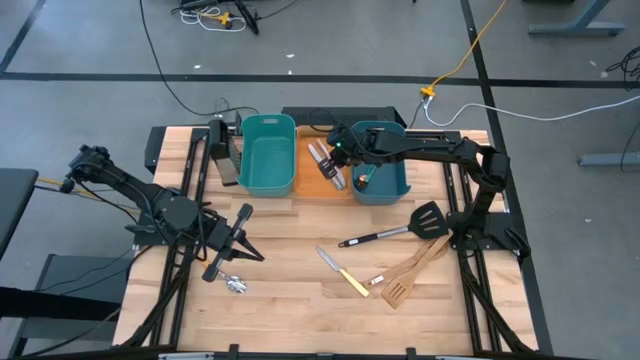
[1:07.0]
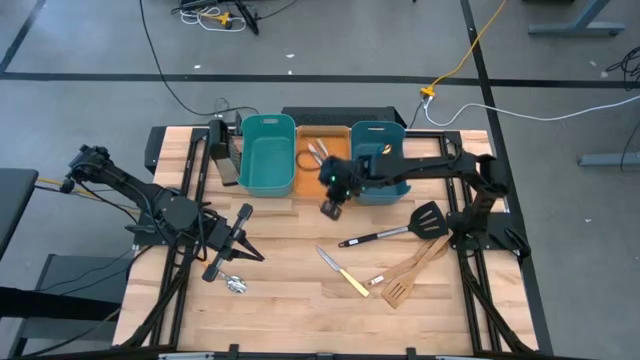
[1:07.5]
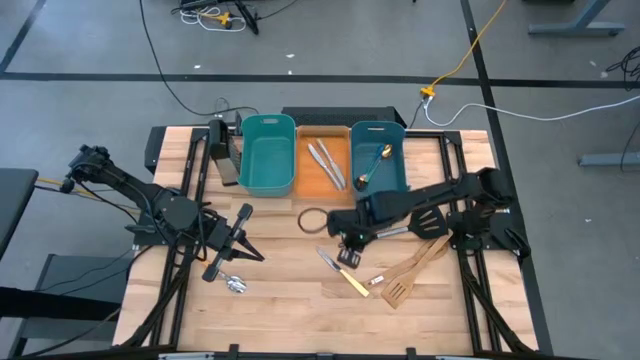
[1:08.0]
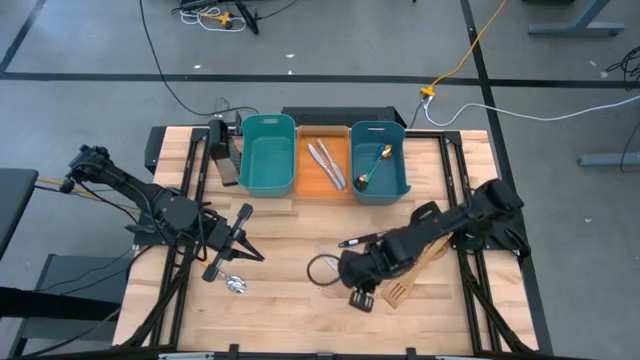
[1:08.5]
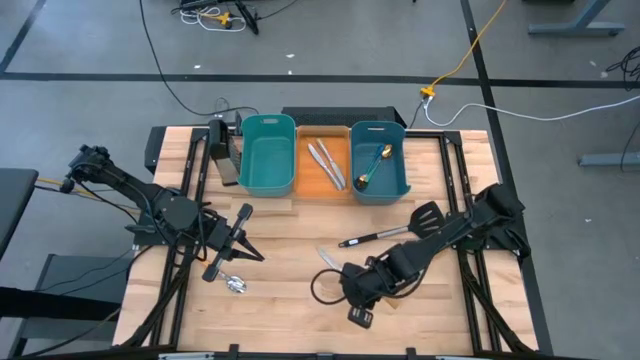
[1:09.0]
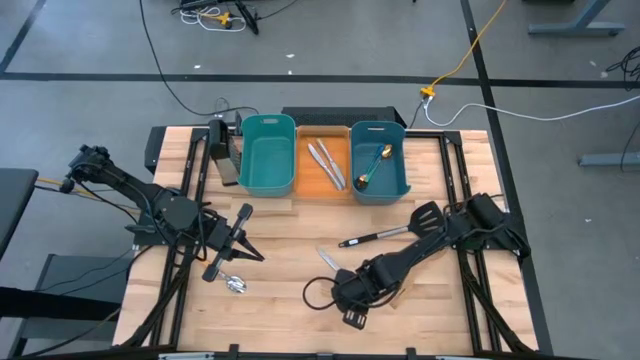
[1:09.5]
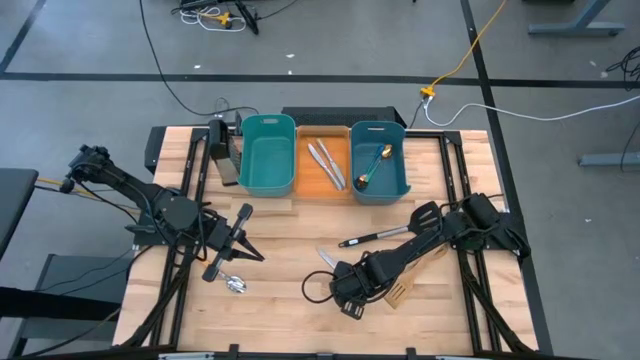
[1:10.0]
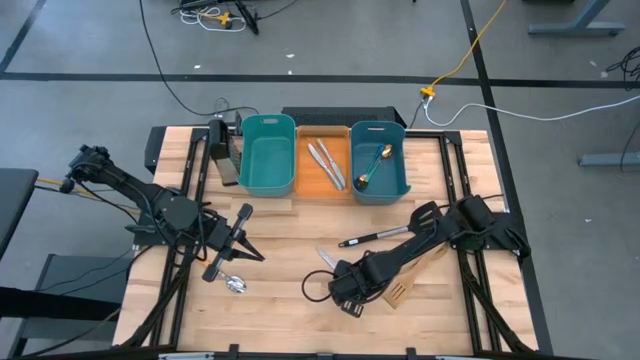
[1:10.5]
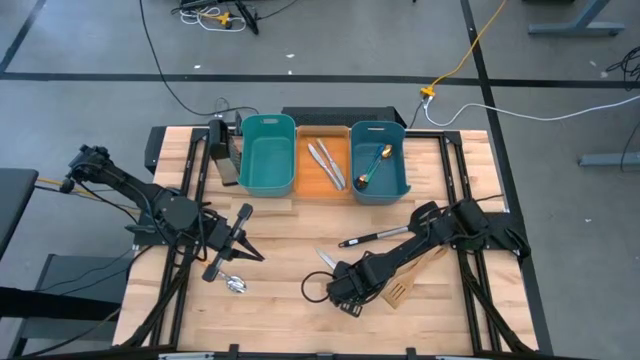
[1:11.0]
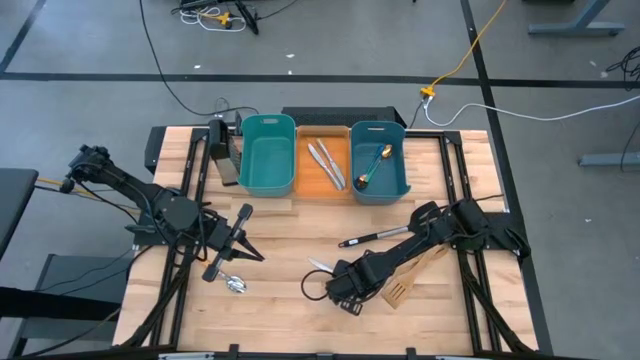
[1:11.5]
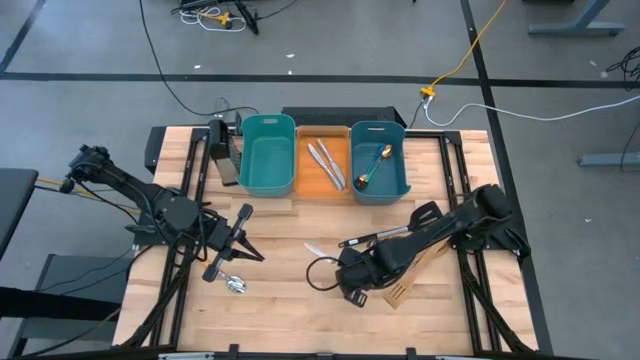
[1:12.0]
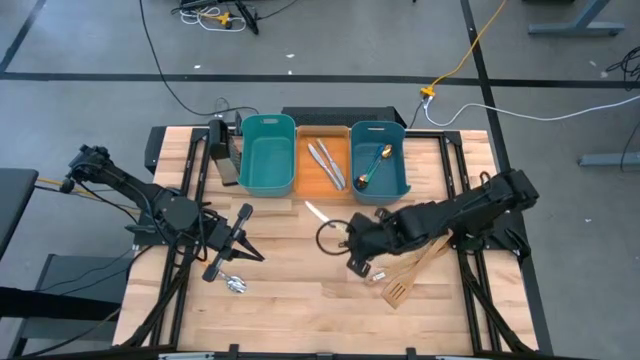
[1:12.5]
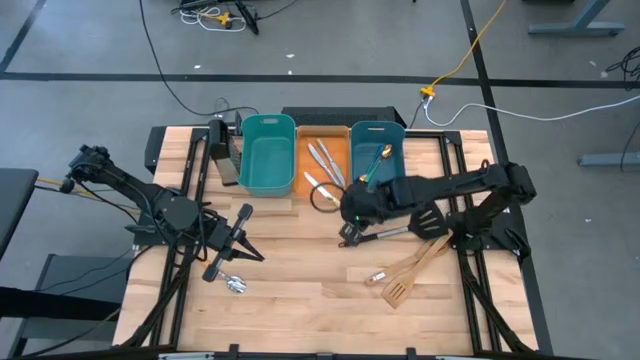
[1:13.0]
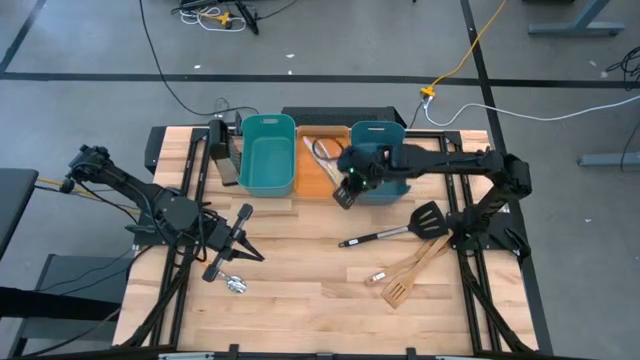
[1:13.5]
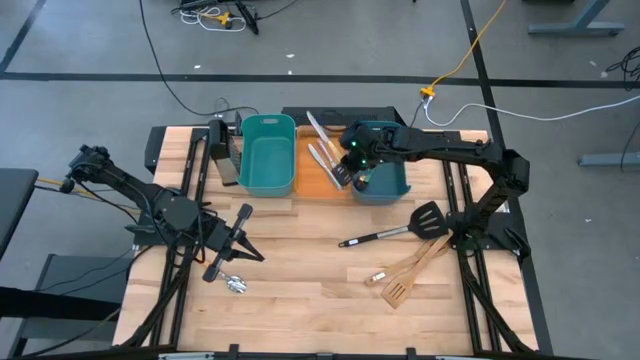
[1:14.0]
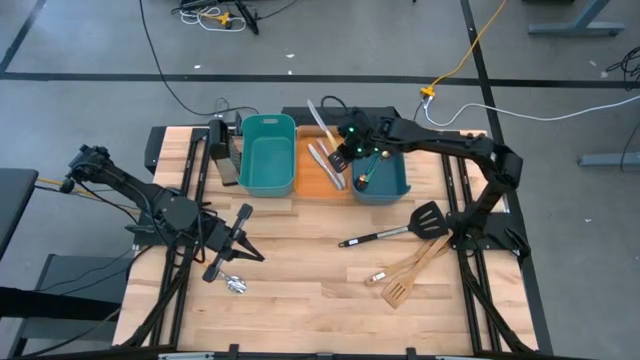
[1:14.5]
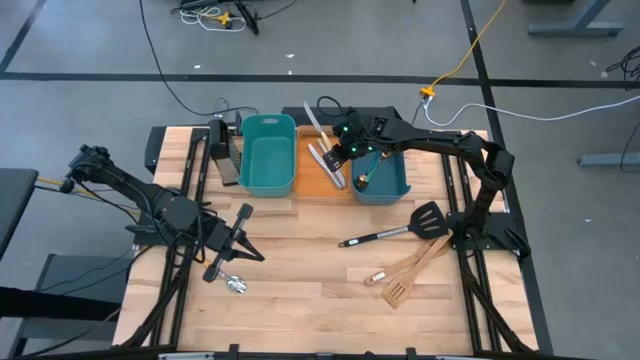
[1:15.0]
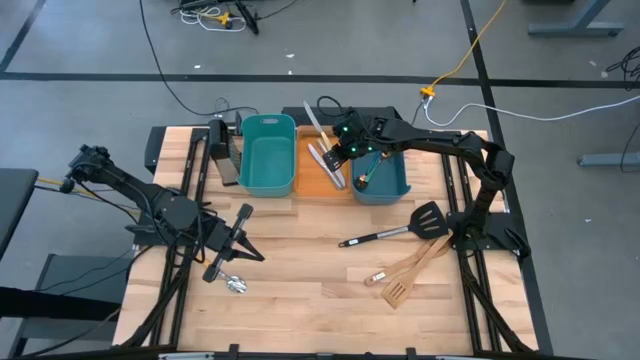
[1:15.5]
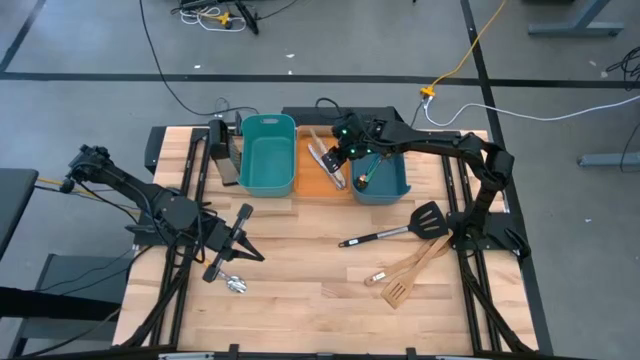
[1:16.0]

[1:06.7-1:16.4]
Task: Pick & Place Kitchen Items
Put the light brown table knife into the orange bin

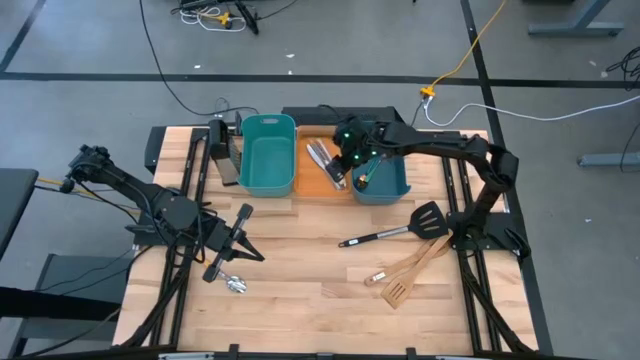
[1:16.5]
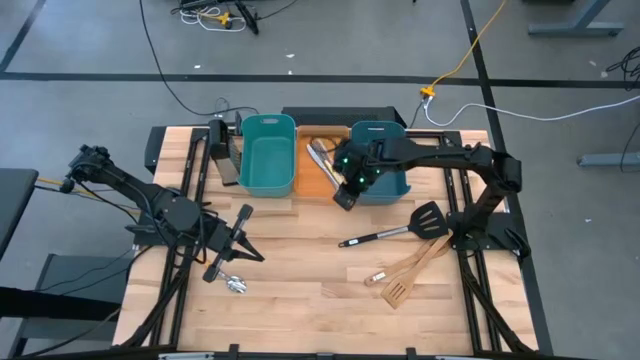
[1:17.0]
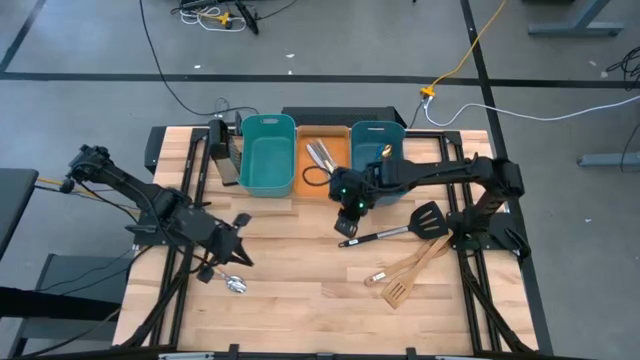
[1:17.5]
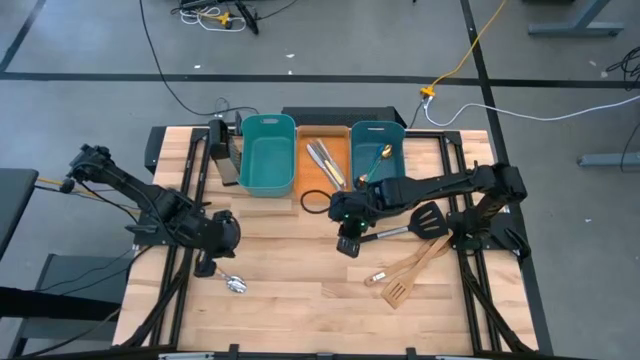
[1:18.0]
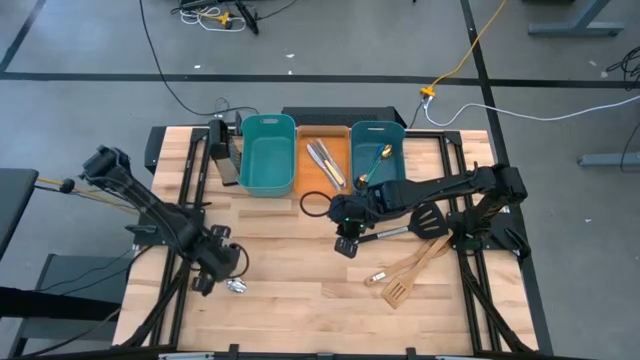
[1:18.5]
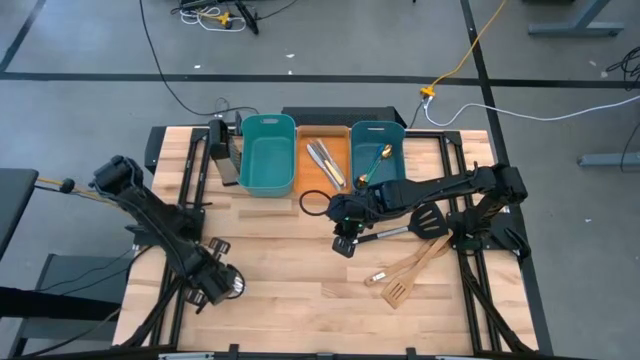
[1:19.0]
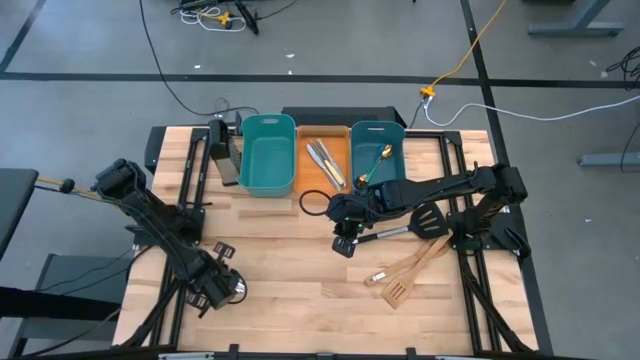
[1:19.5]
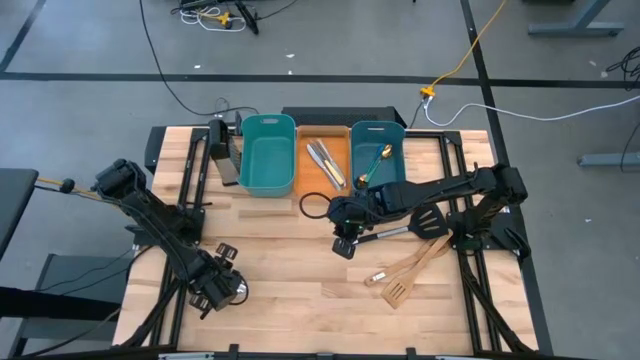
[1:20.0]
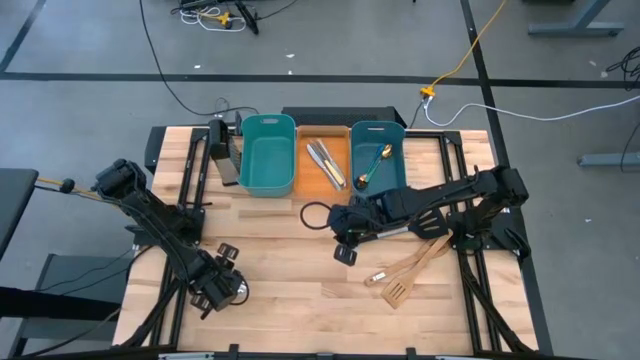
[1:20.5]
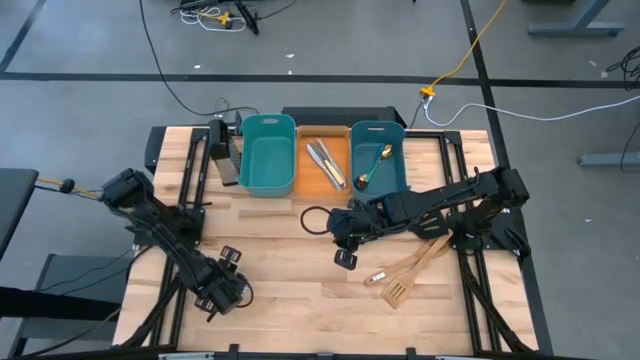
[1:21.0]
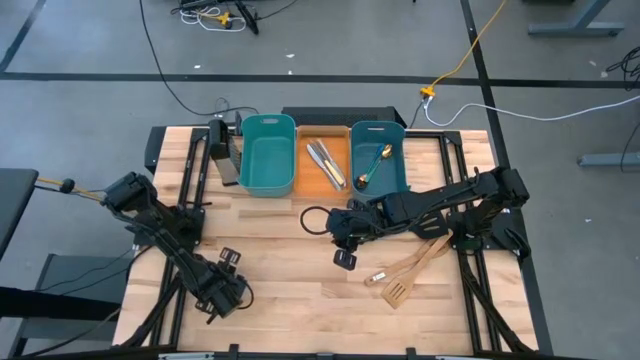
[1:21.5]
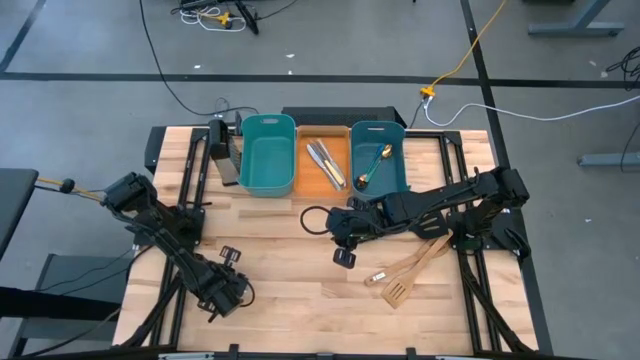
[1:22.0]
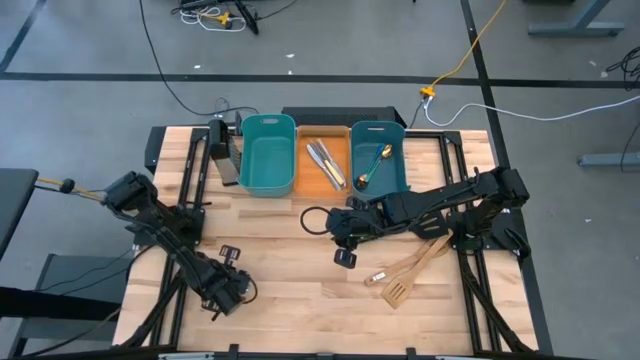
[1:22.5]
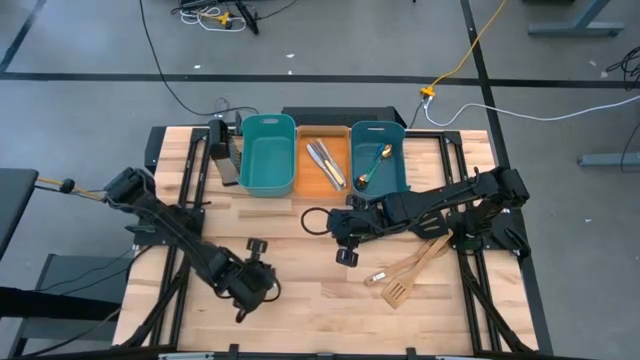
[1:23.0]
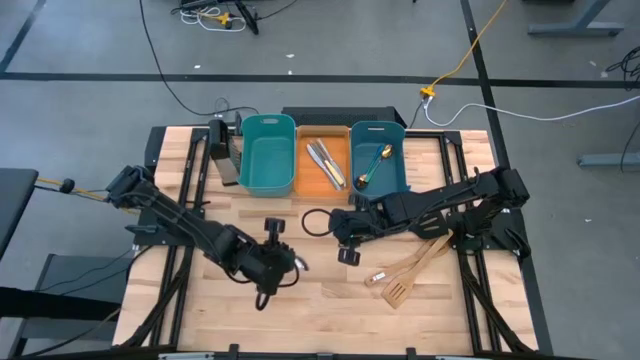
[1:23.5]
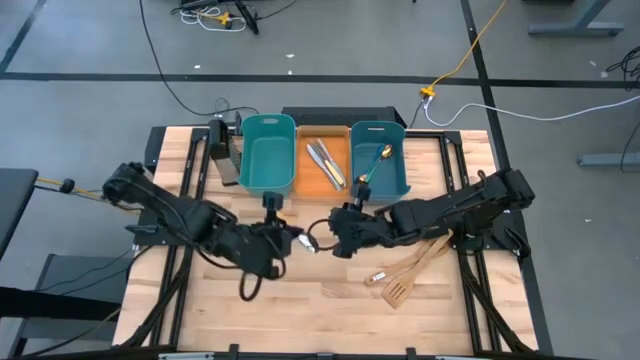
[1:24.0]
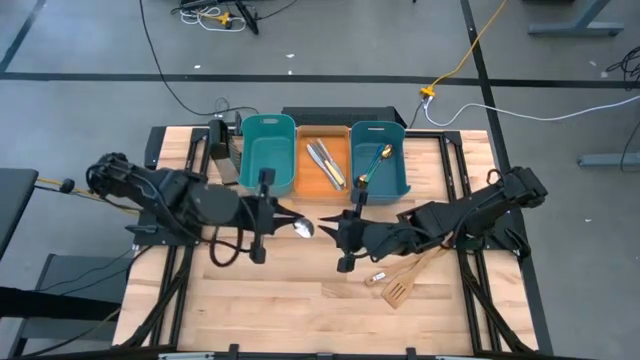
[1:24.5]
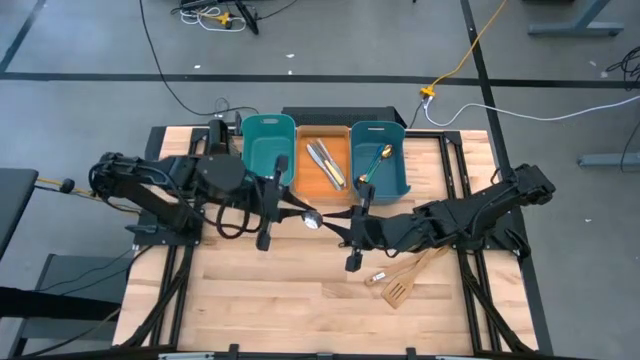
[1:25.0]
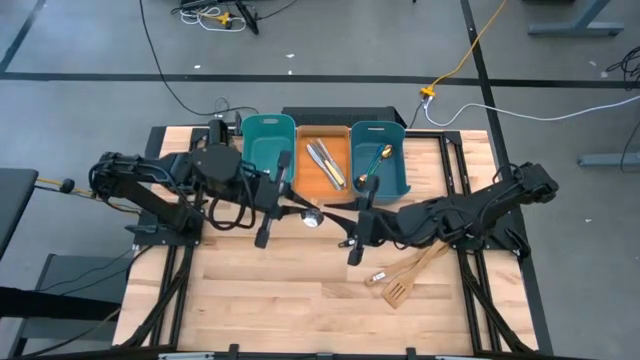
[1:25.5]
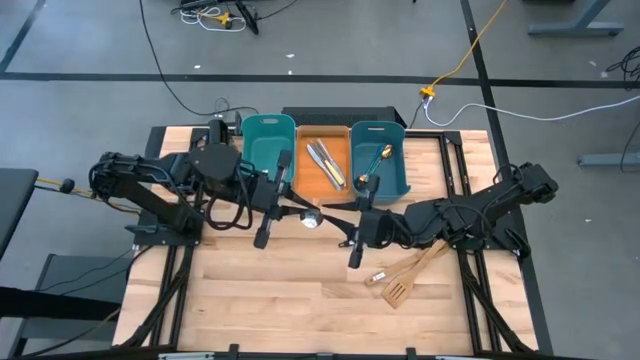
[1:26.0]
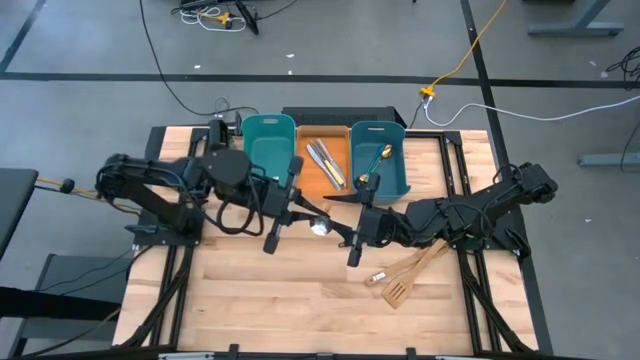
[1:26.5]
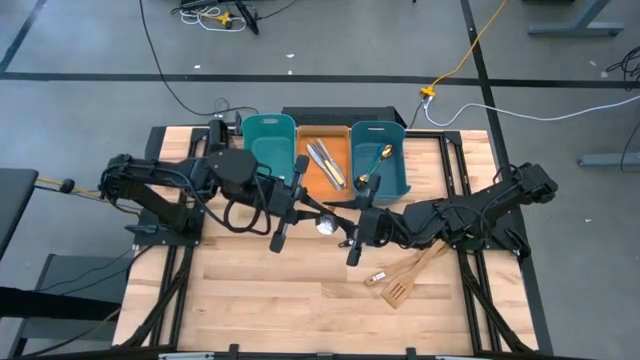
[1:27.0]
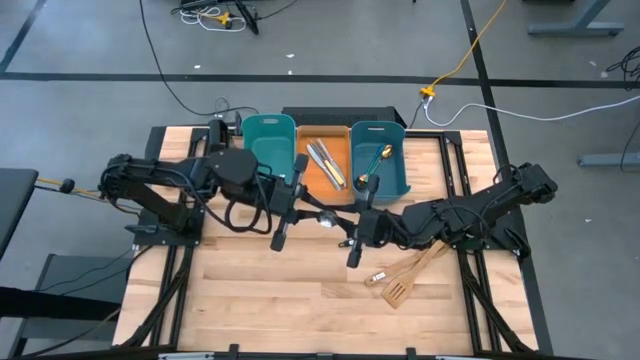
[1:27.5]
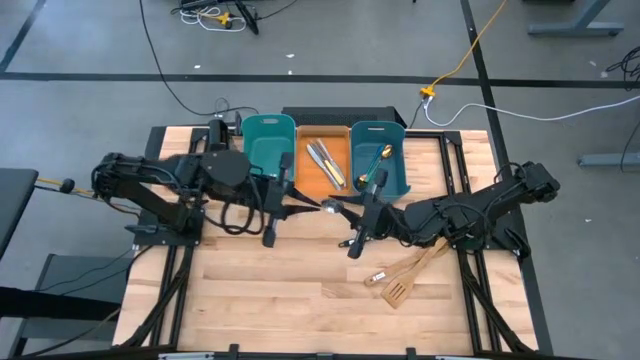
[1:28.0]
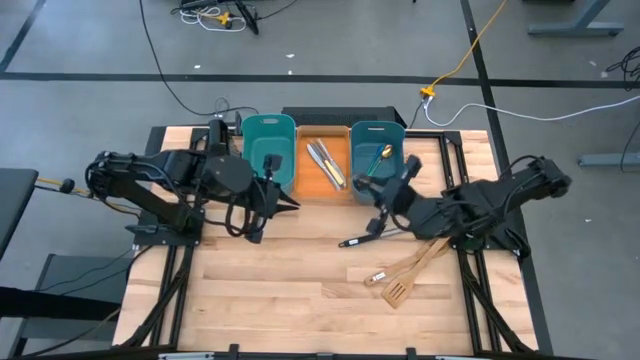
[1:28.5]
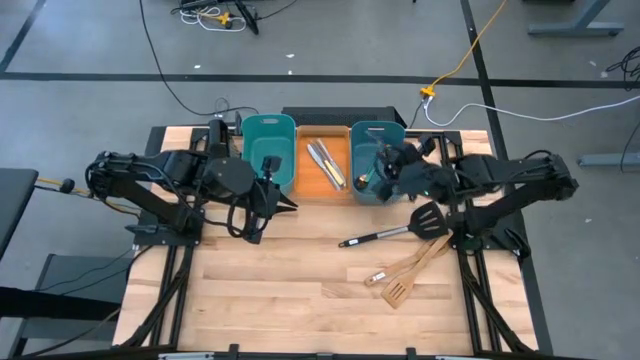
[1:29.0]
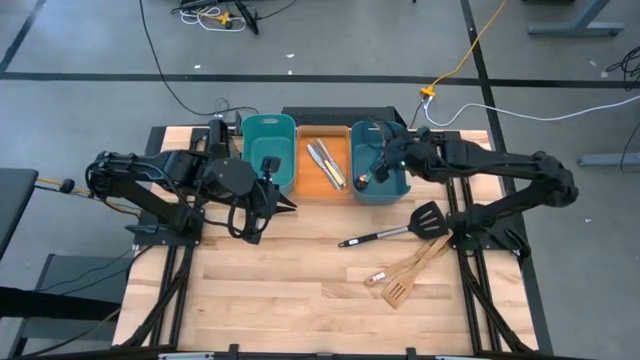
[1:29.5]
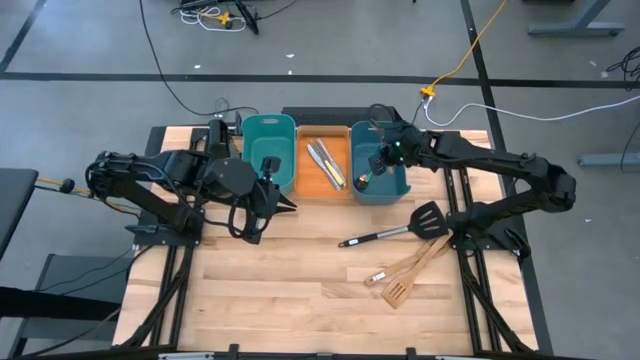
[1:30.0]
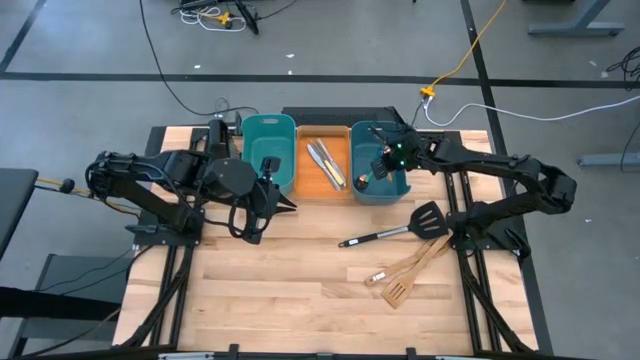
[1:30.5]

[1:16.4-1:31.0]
Put the light brown spoon into the dark blue bin
